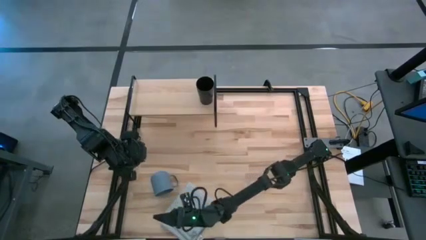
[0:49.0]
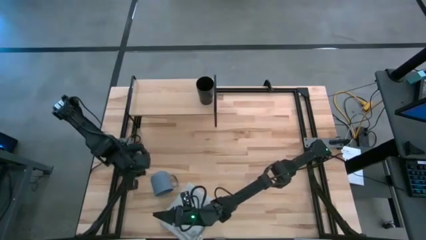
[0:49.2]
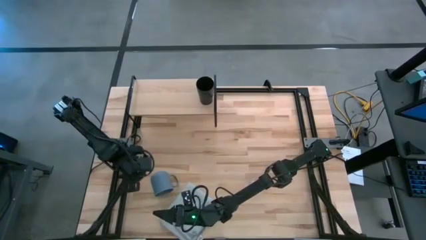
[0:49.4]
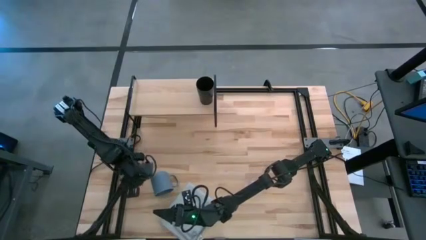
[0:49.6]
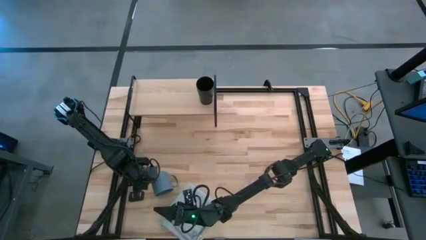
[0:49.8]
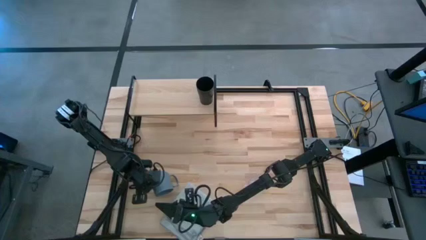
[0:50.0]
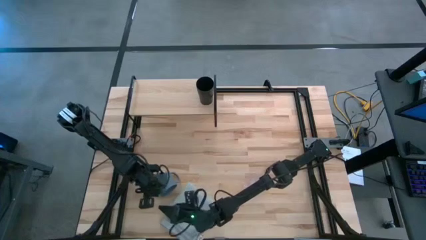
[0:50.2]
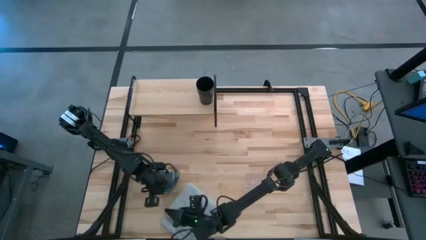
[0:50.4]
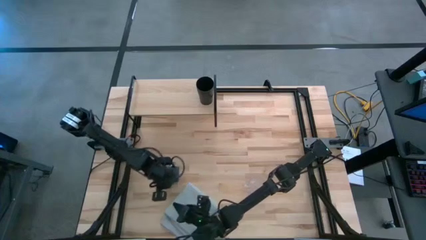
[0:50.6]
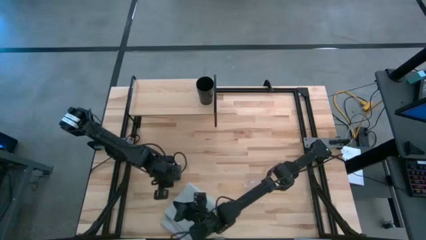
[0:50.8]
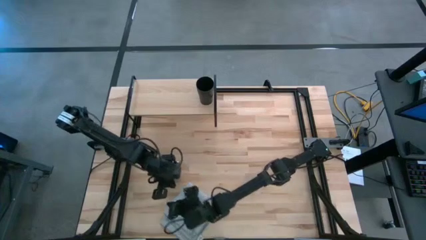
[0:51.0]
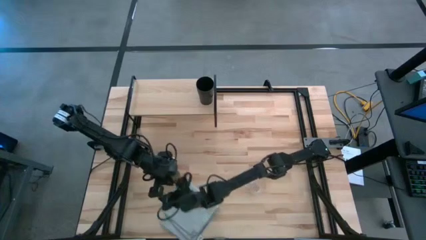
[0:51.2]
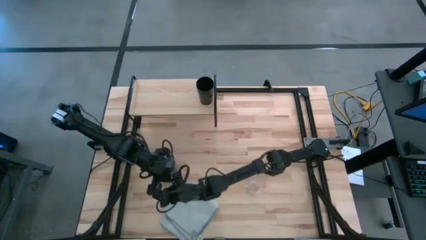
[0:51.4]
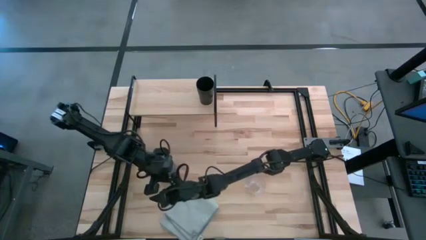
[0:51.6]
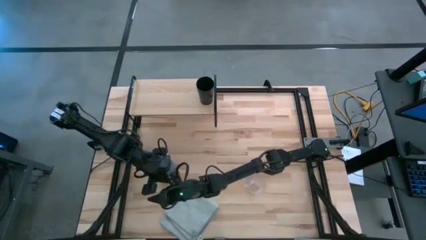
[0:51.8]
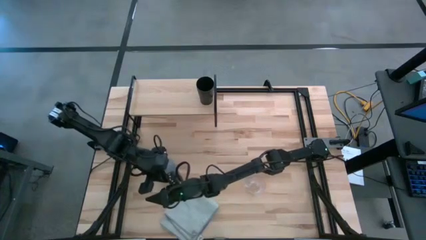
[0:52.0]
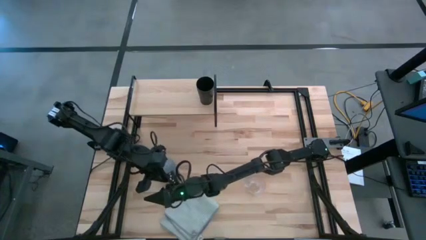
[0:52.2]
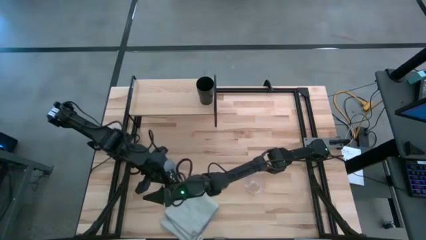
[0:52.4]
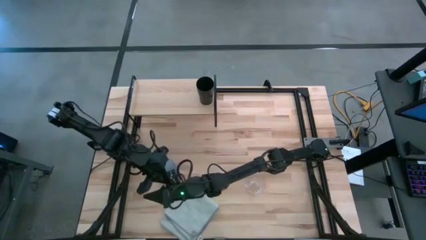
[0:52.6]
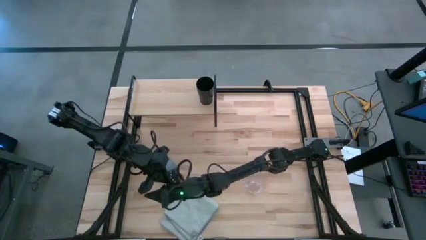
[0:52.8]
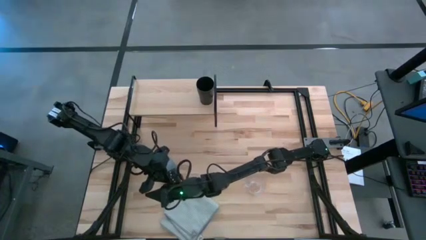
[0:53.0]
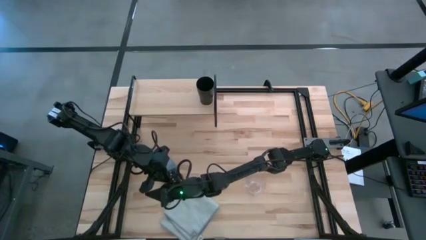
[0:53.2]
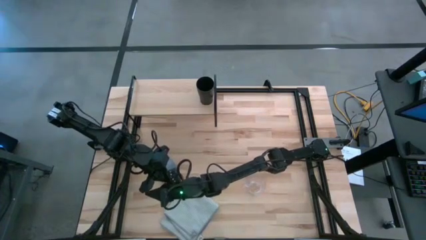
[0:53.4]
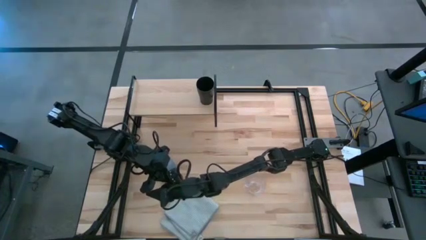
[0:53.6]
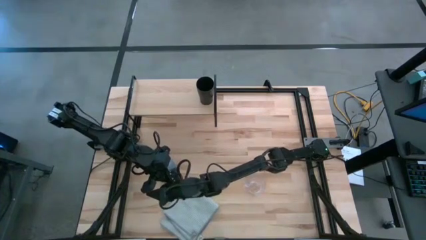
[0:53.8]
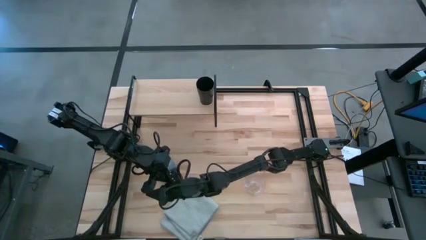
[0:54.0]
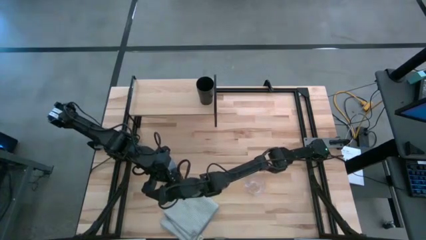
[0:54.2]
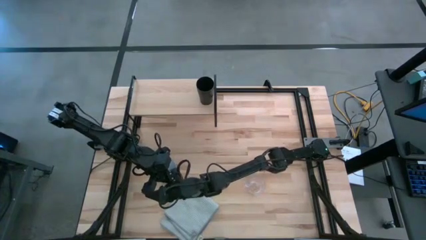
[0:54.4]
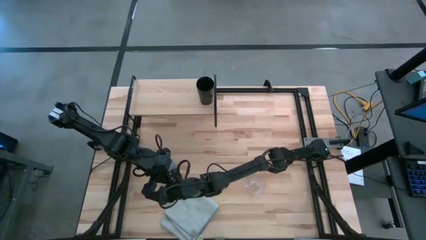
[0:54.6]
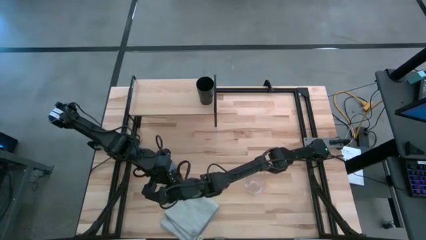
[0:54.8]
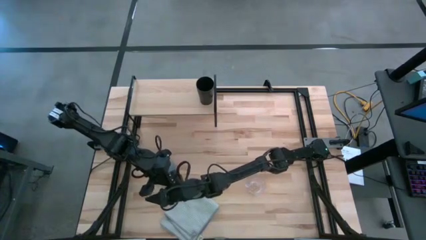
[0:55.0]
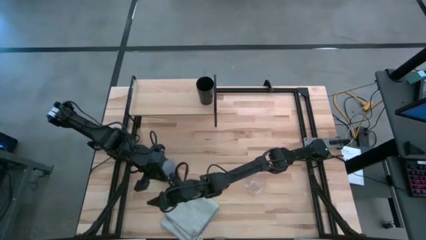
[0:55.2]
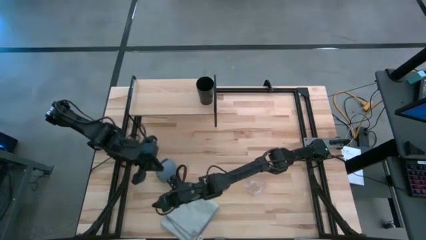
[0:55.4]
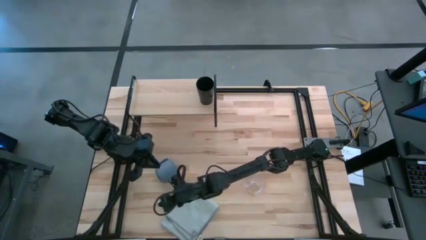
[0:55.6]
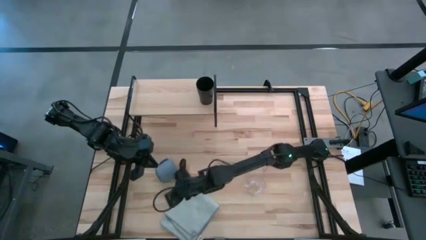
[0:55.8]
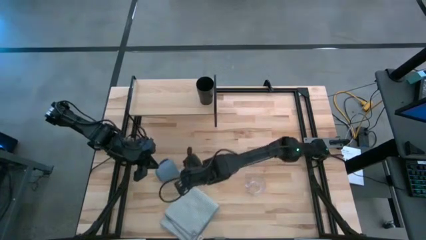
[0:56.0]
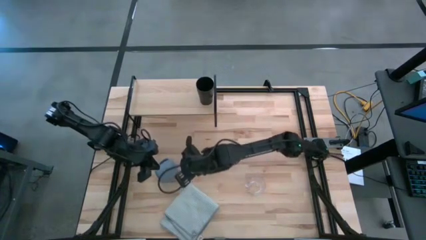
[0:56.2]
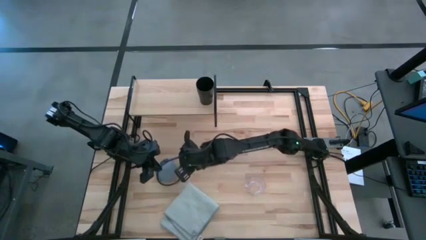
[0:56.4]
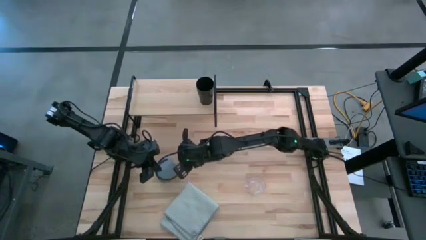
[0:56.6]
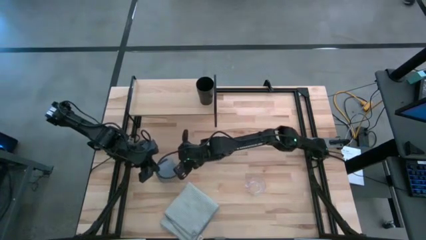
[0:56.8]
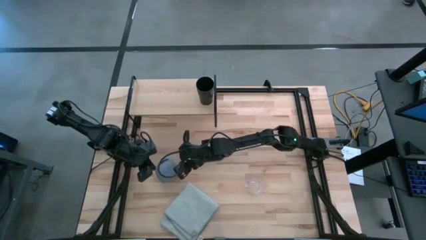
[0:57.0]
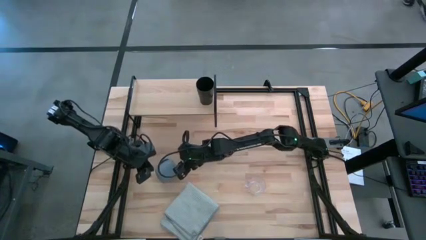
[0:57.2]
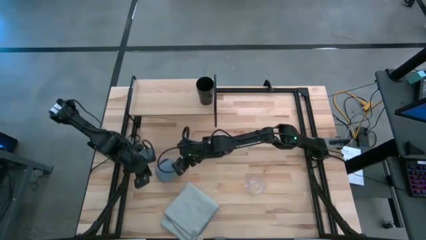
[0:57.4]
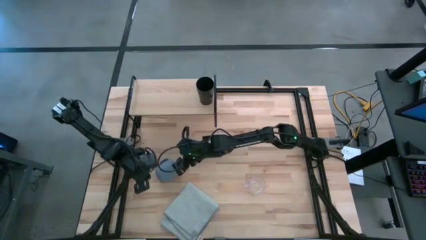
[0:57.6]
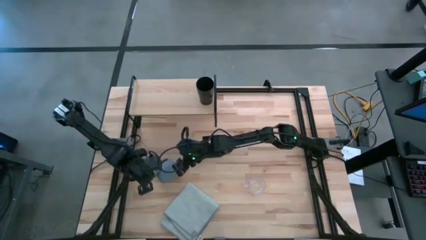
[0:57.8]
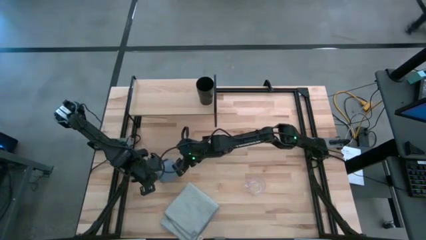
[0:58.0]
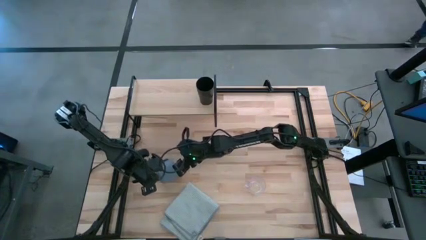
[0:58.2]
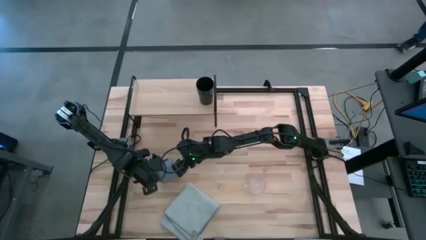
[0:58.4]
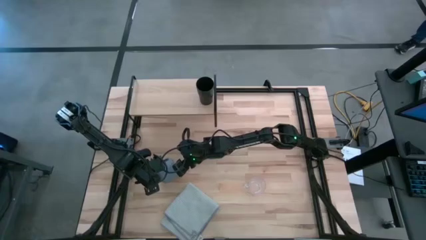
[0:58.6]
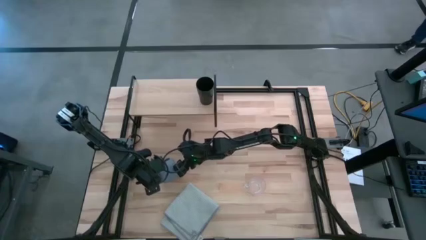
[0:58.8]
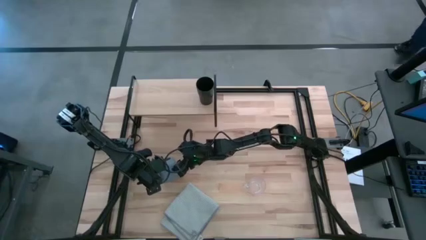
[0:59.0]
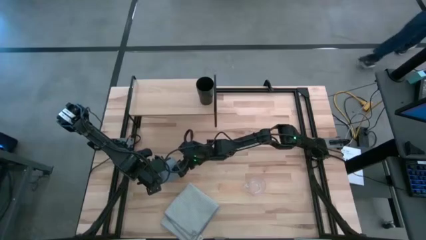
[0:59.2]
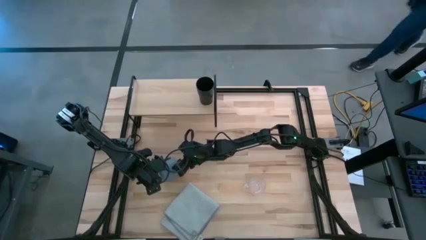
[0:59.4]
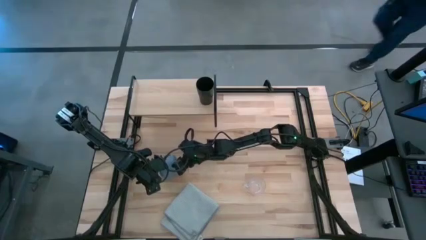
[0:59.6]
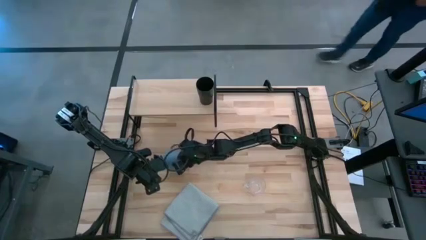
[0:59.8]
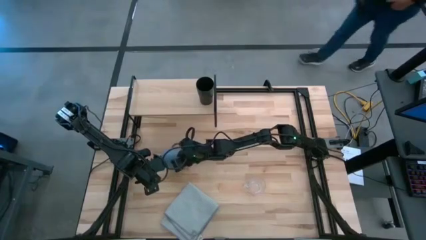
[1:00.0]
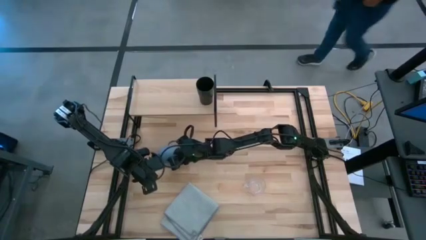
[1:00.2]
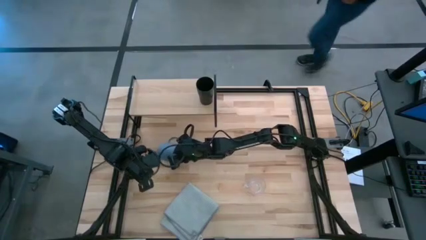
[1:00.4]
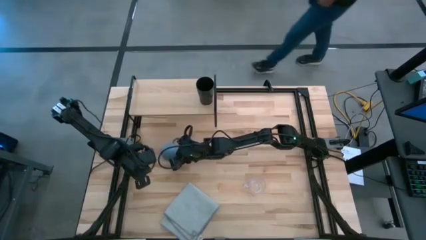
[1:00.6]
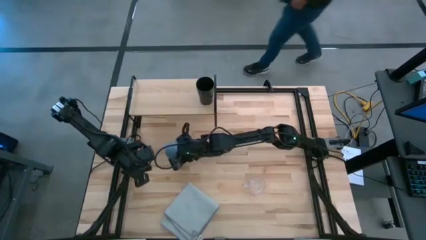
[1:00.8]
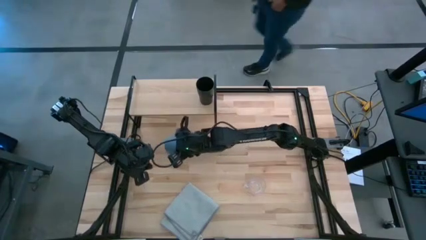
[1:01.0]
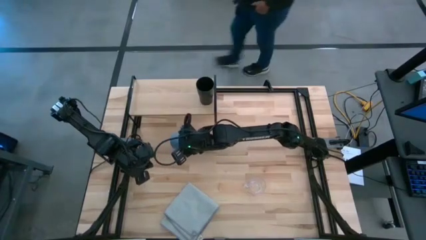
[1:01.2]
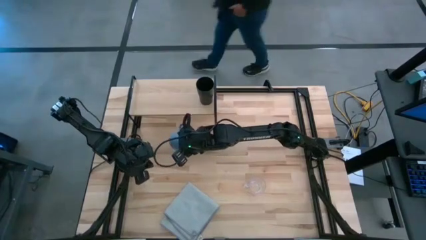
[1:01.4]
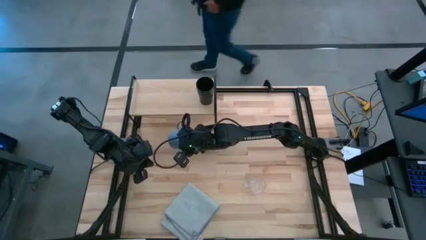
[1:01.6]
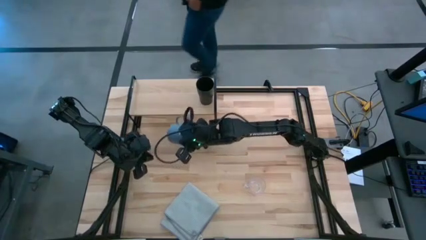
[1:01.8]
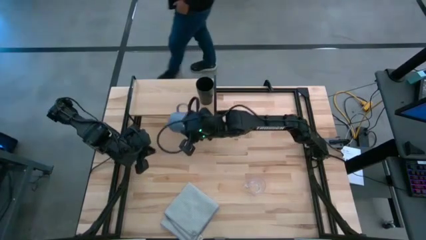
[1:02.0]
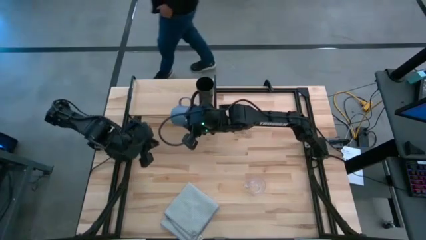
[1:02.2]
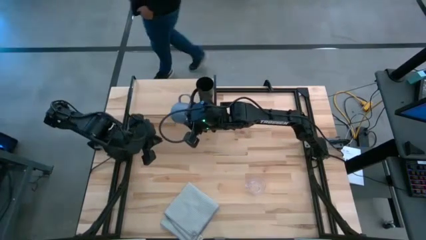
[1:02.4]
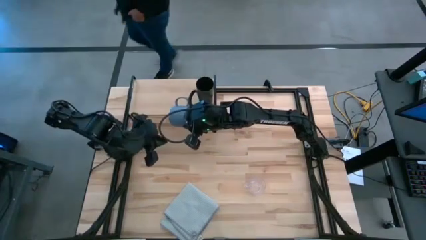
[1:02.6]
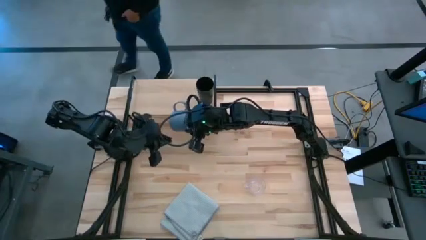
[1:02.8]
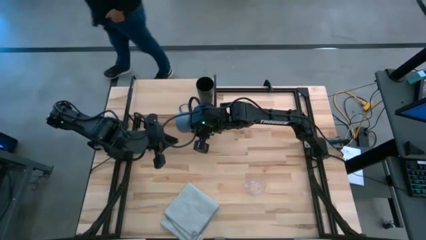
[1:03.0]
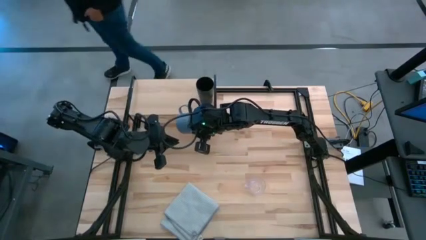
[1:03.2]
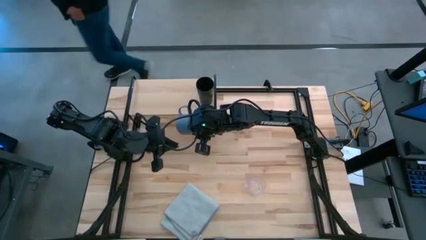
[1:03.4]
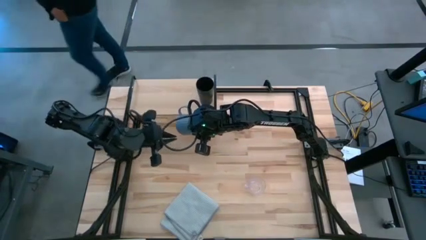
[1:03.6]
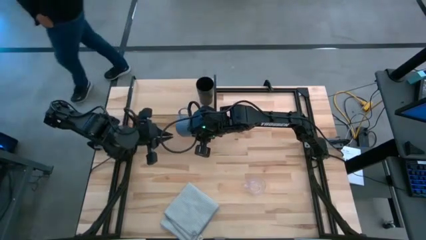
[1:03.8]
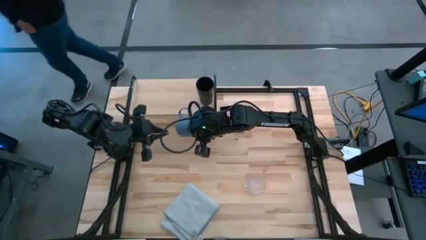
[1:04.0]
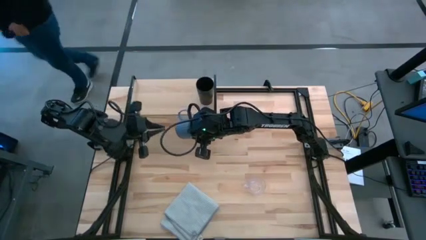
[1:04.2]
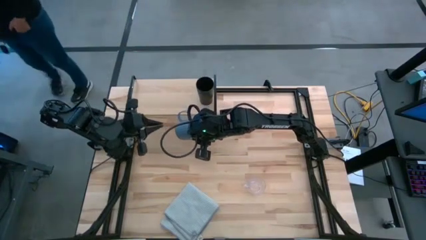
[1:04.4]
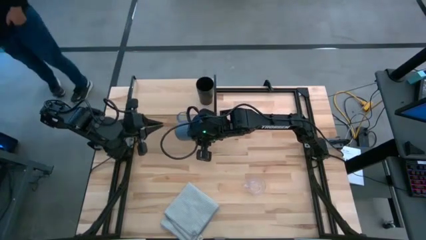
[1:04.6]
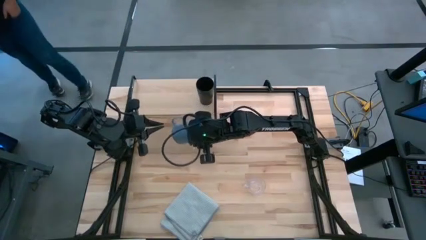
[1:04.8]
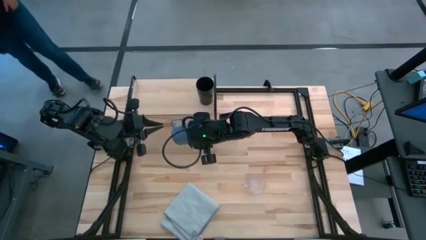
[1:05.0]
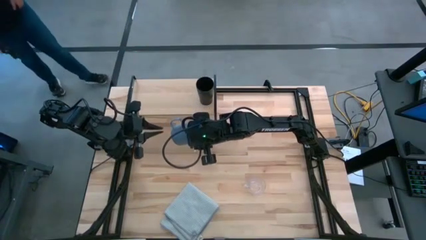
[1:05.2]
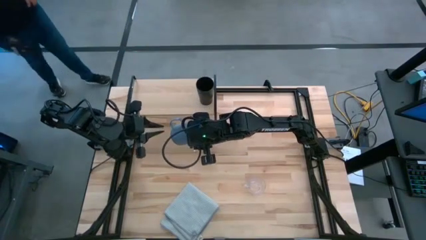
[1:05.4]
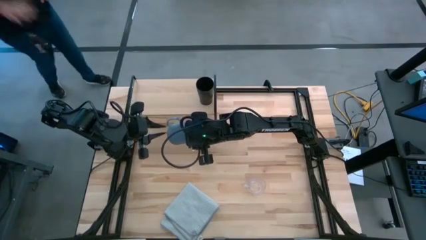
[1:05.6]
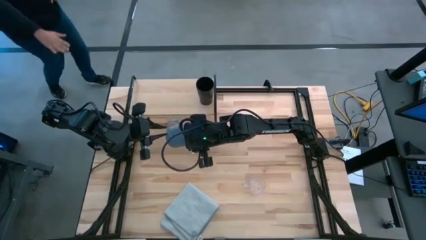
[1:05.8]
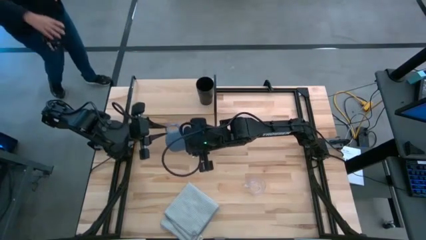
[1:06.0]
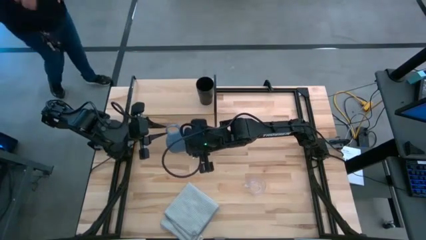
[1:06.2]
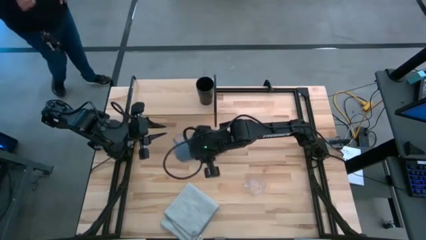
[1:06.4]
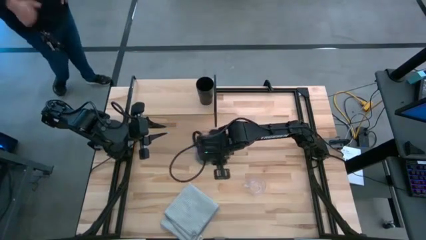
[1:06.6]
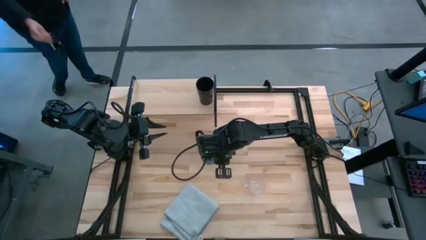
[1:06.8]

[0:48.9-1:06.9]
Task: Stack small to large cups/mugs on shelf
Put the blue mug on the shelf
